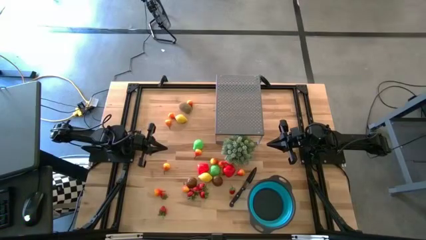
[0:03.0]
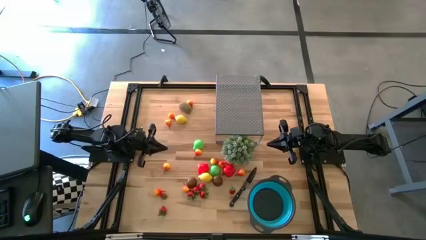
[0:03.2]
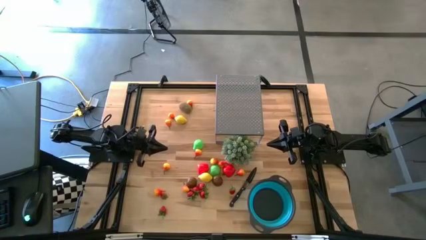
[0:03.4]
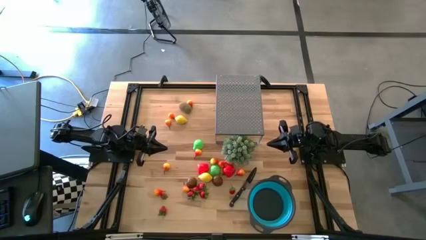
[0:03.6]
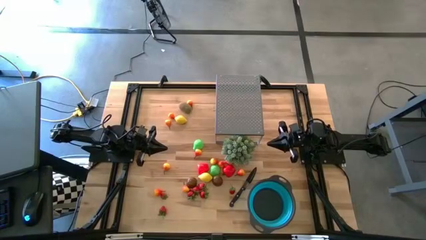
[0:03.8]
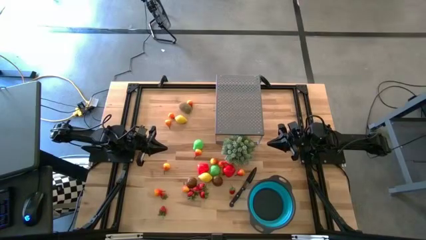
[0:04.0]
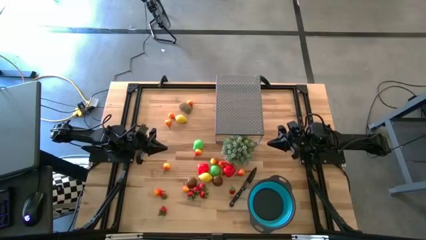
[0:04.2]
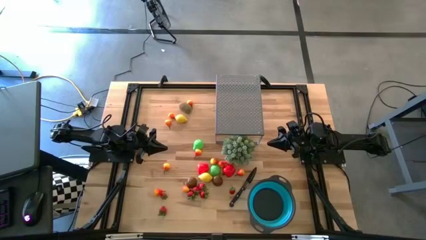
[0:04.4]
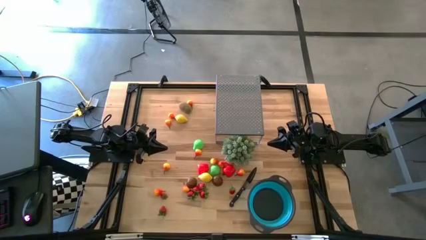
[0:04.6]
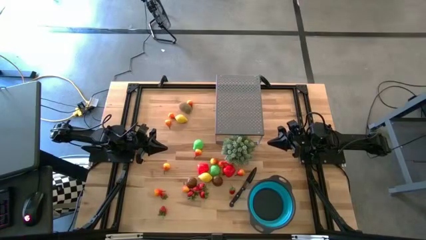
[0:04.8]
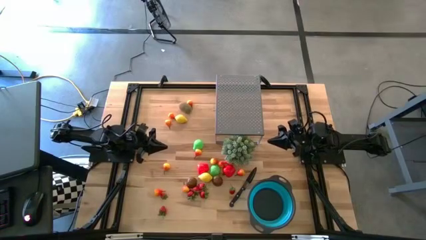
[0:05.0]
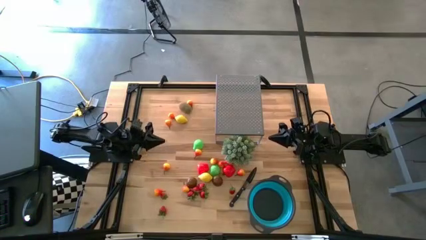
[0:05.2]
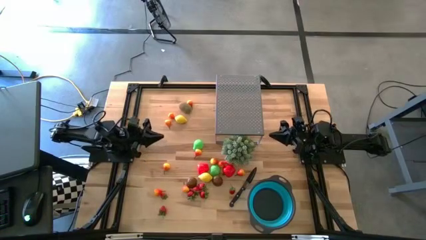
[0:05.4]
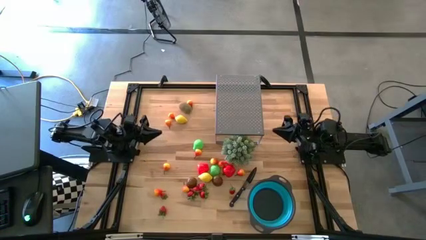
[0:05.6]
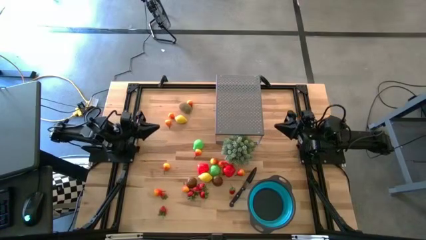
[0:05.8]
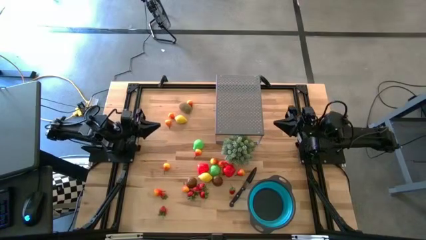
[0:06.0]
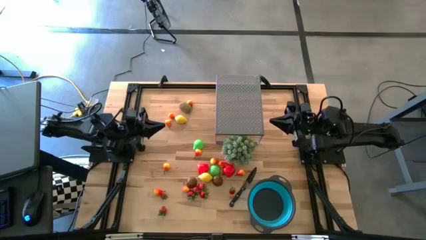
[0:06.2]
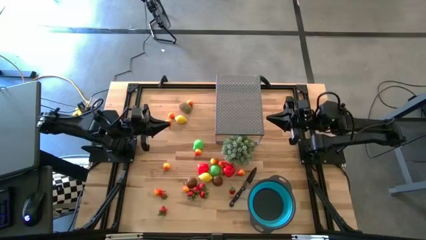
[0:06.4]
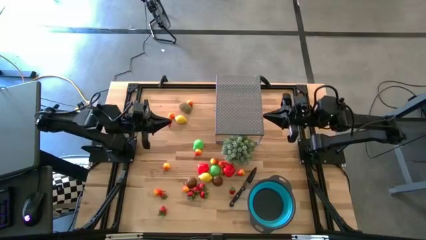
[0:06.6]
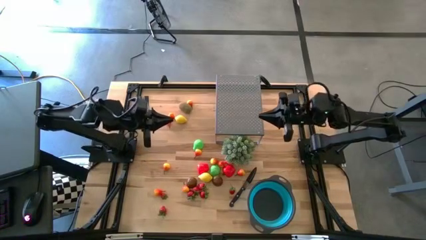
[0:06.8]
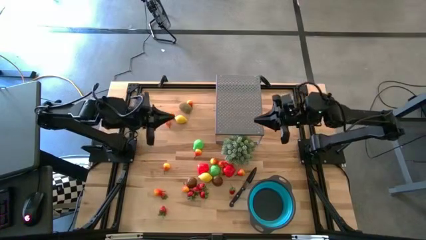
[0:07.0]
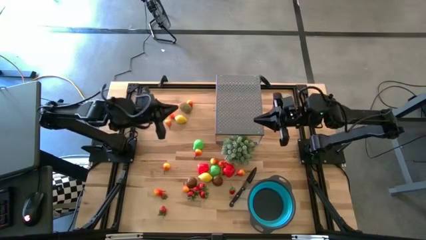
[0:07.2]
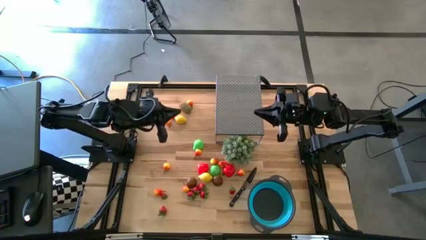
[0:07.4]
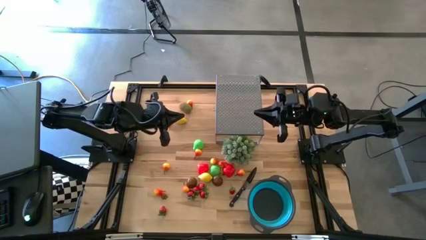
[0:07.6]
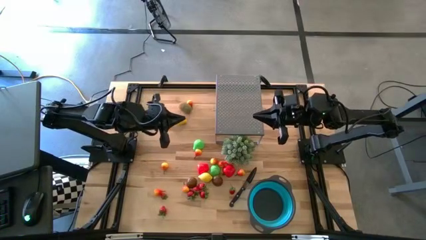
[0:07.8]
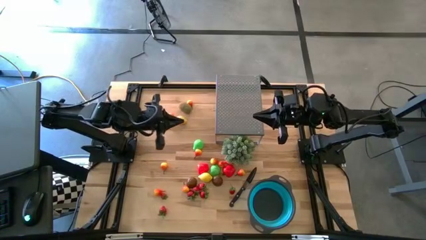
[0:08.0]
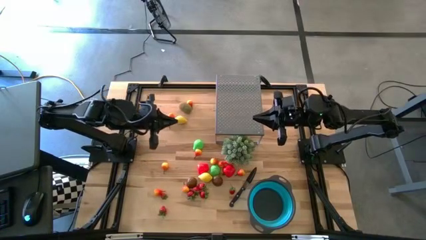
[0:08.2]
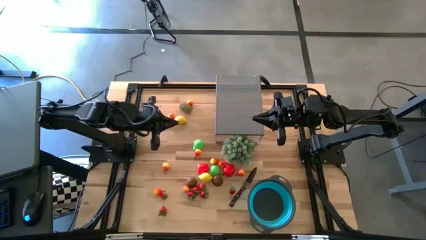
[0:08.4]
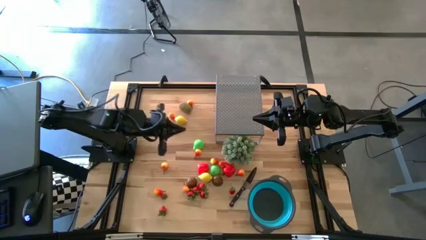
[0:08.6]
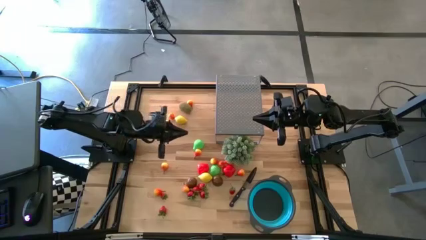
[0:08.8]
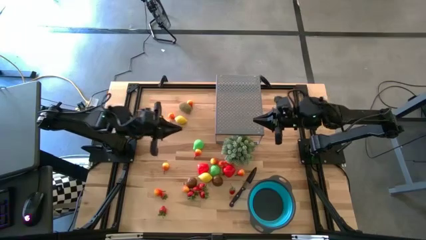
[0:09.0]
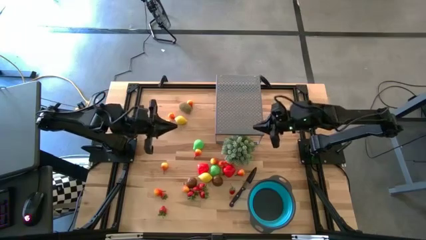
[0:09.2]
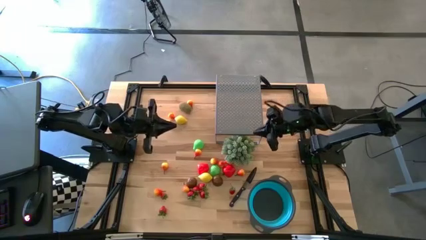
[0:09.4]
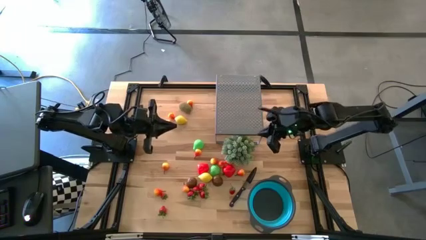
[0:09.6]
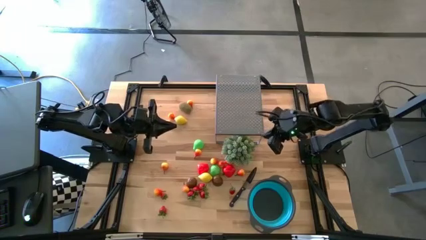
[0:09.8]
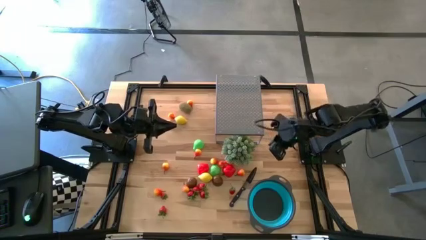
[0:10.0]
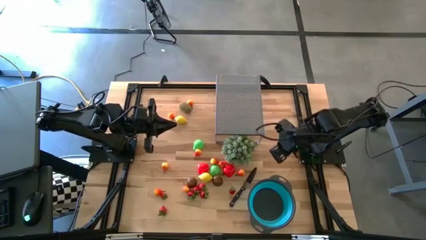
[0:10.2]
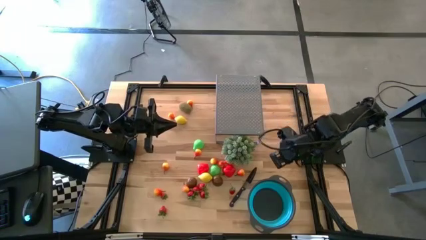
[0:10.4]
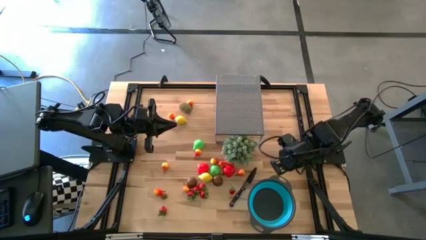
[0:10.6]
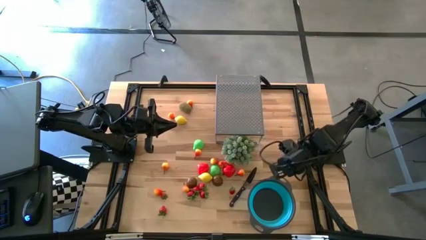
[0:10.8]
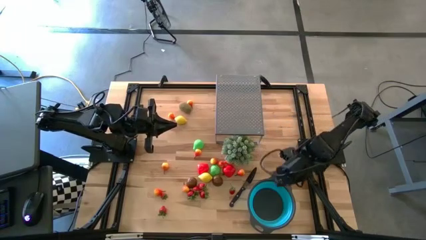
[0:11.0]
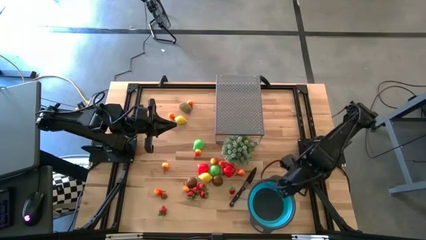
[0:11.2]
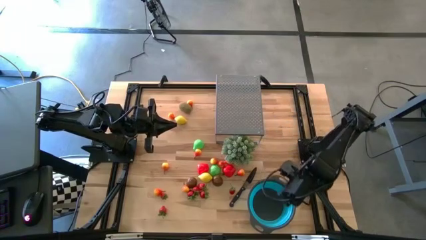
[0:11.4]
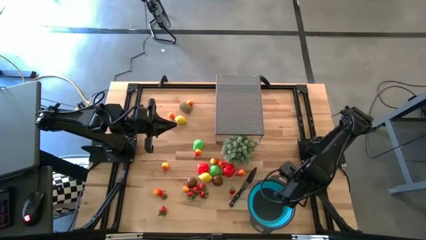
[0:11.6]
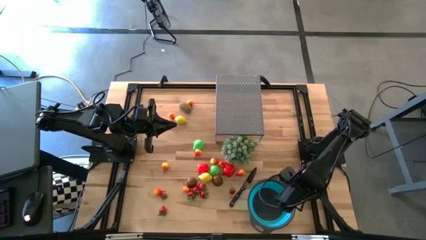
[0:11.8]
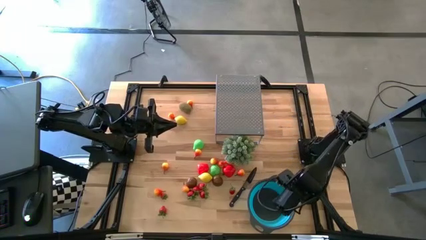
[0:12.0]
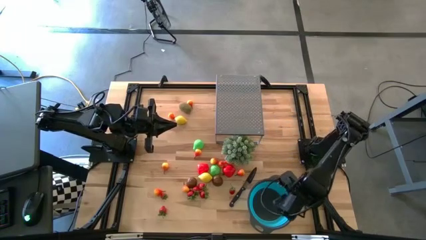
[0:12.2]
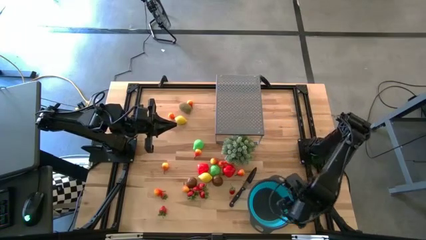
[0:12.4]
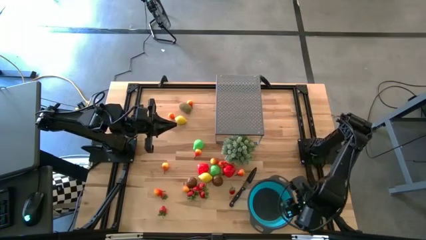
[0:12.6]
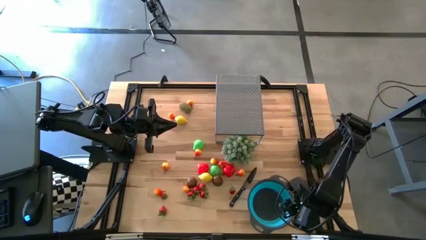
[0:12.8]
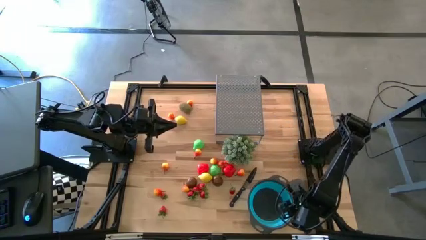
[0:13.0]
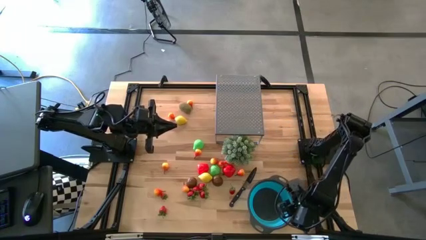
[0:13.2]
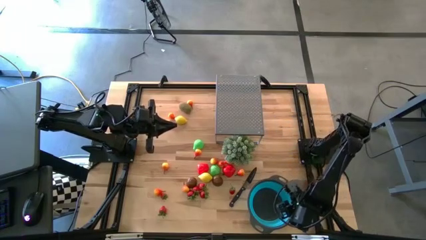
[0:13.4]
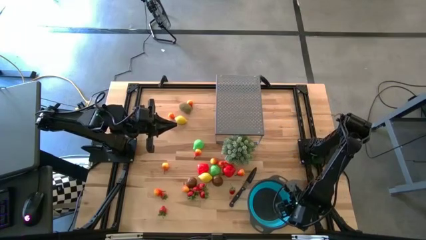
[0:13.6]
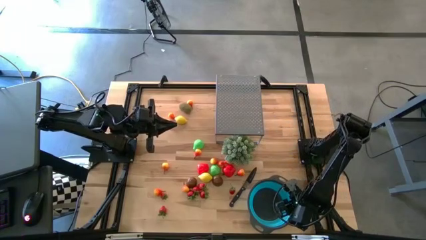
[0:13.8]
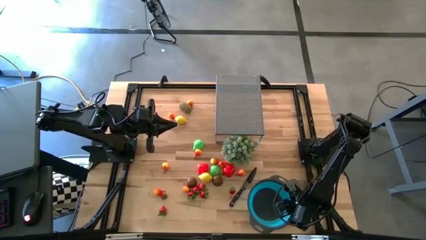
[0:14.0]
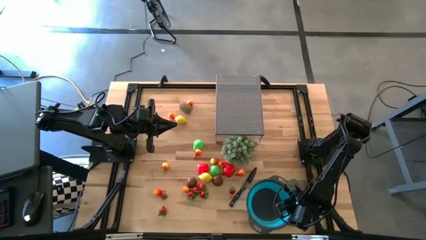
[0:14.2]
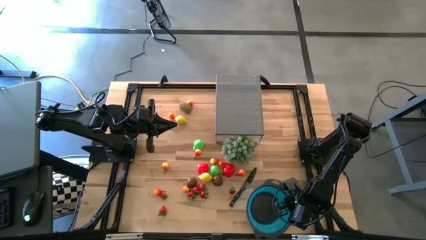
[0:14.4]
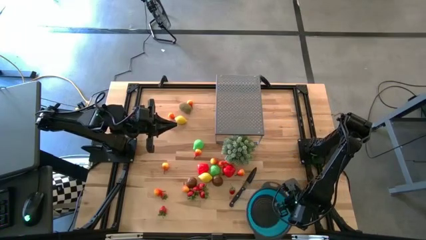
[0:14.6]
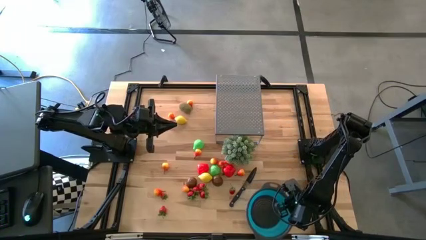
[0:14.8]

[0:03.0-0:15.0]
Task: Pick & Place Fruit
Put the blue strainer bowl on the shelf

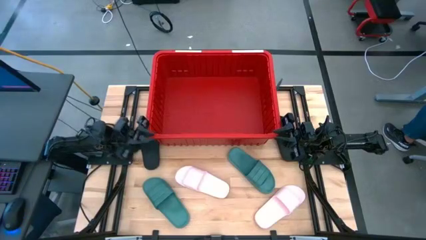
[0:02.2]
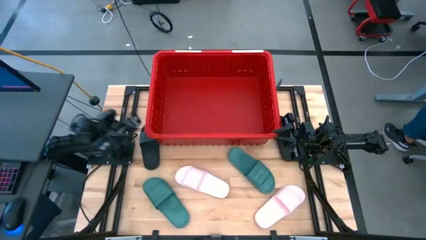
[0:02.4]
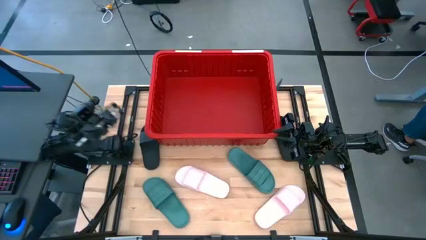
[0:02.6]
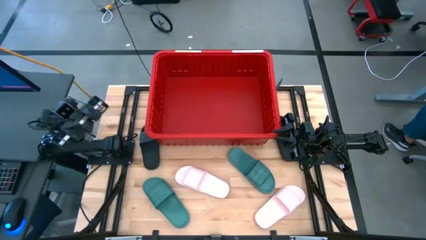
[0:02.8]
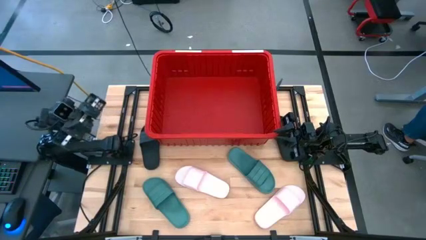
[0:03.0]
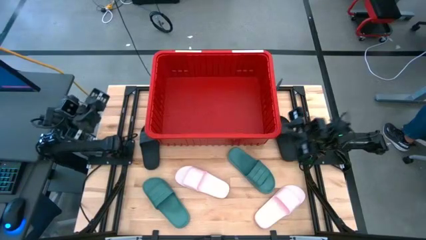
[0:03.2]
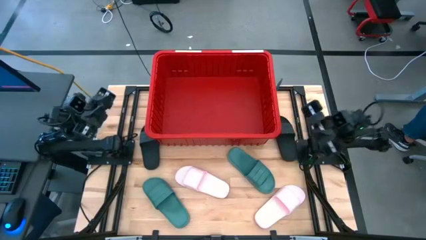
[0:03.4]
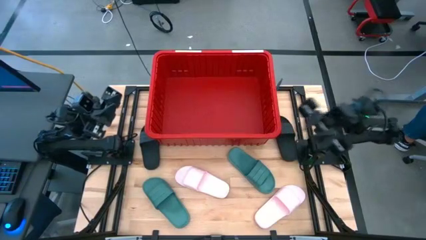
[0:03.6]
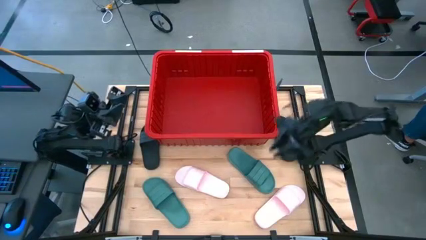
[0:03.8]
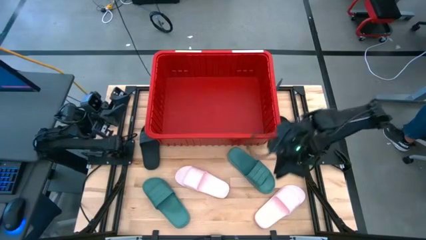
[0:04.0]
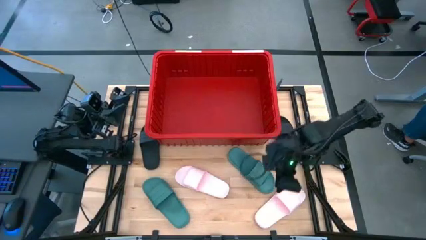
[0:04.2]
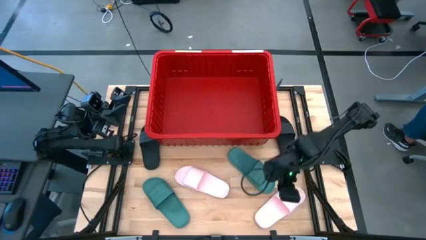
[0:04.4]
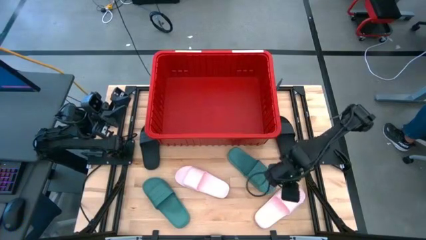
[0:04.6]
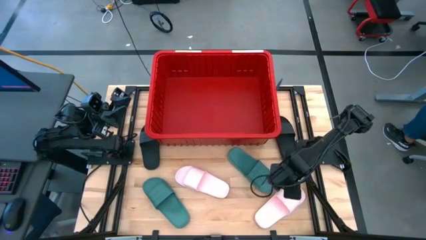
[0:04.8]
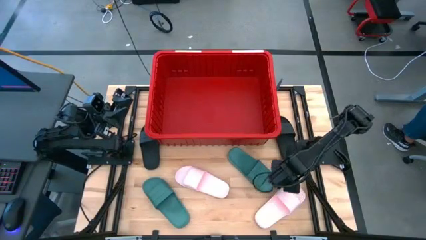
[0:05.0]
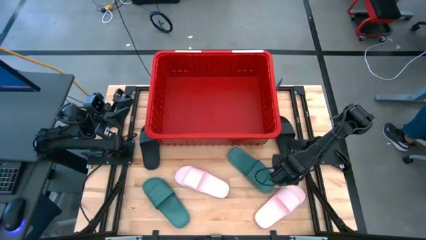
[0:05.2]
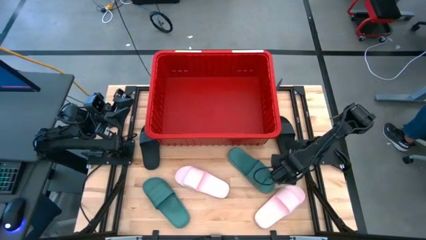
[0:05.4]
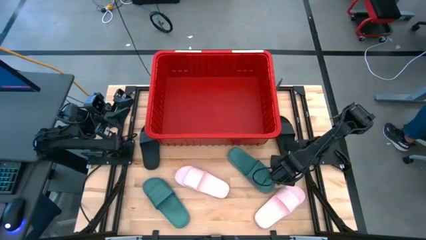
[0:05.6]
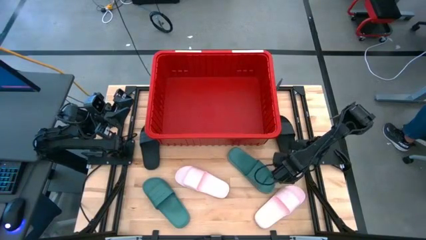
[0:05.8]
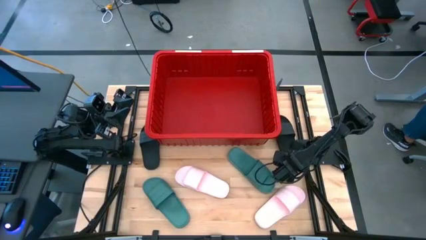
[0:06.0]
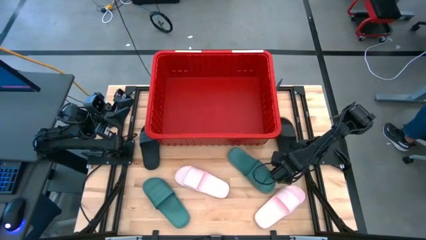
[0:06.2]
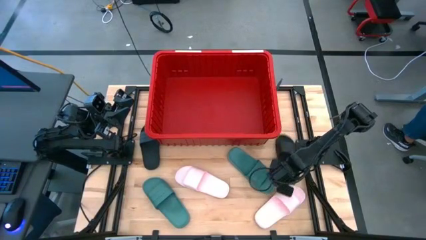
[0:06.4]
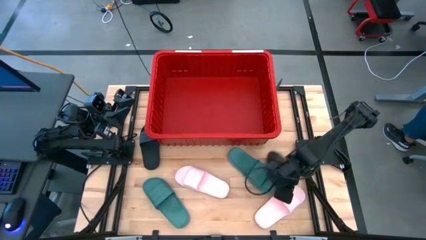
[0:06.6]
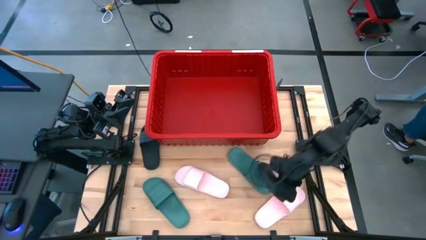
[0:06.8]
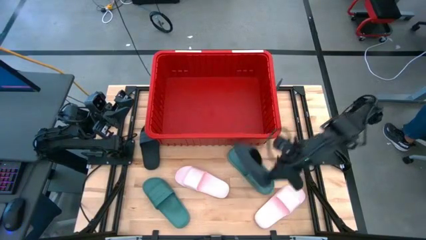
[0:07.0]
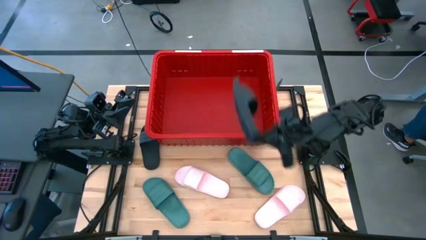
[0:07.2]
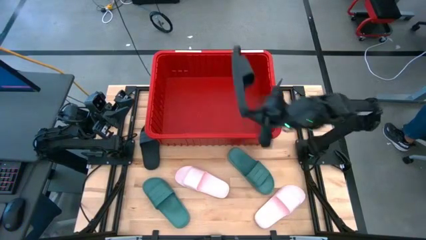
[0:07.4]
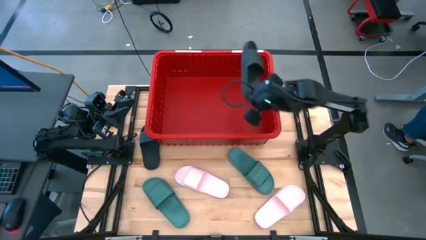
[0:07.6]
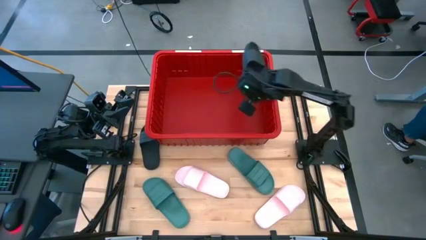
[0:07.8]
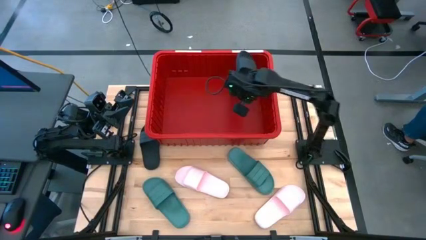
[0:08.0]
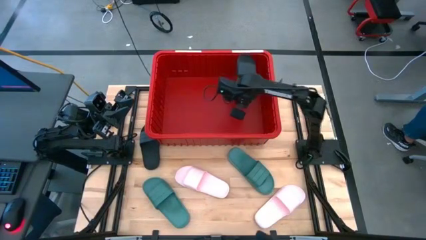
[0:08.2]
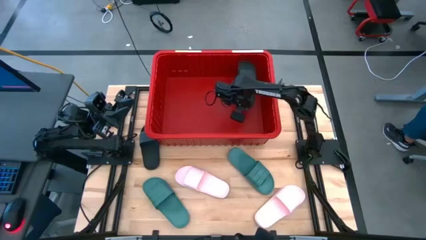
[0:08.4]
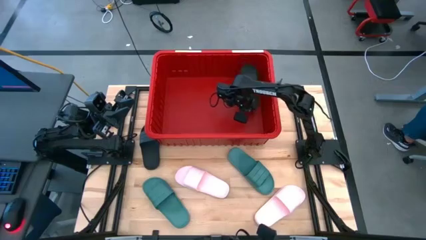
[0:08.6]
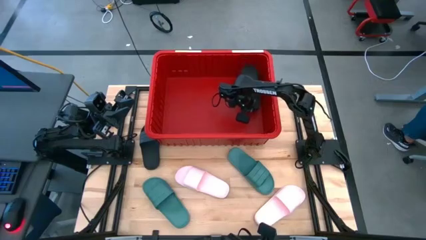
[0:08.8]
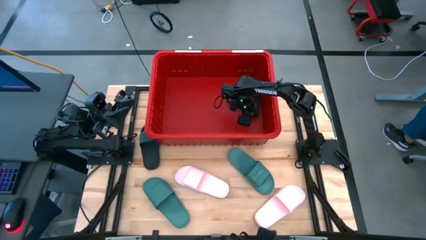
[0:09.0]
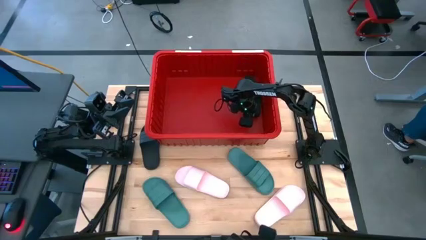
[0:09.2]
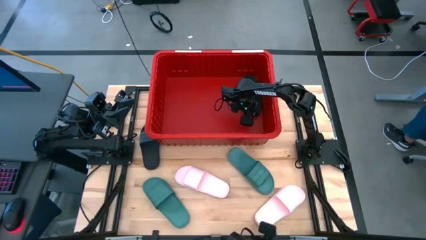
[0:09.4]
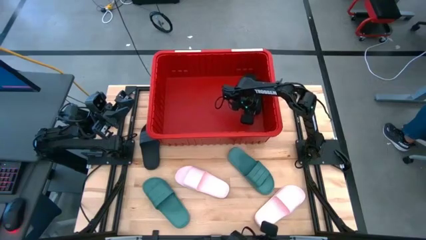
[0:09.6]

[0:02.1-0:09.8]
Task: Pick and place slides into bin
Put the right black slide into the container
